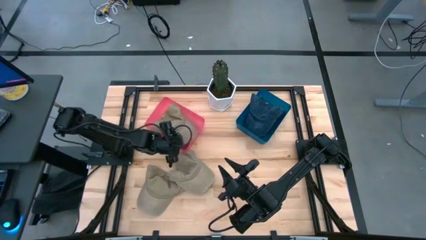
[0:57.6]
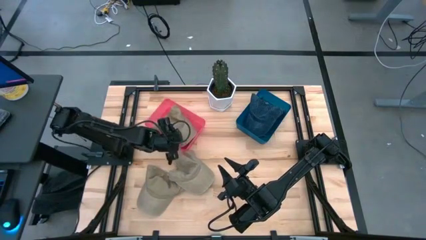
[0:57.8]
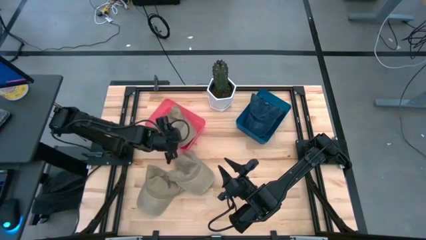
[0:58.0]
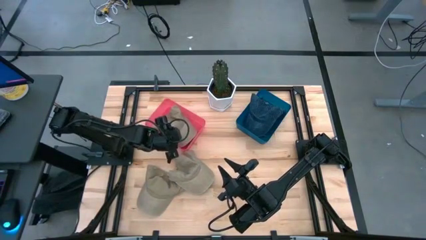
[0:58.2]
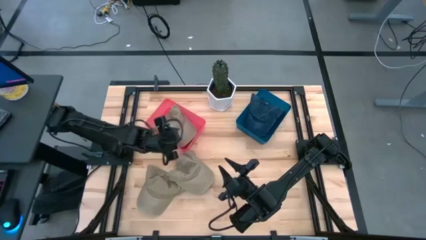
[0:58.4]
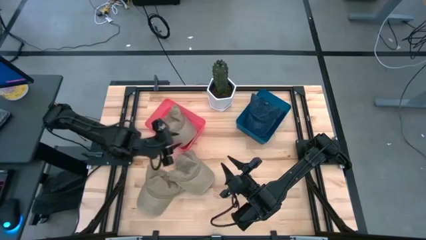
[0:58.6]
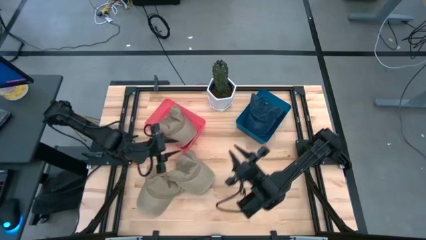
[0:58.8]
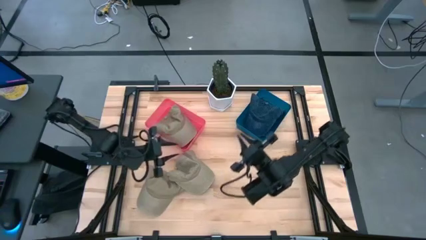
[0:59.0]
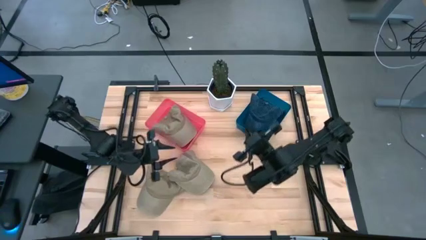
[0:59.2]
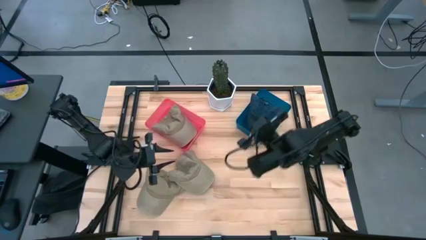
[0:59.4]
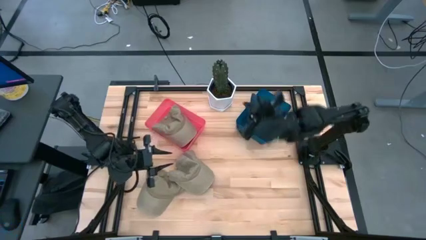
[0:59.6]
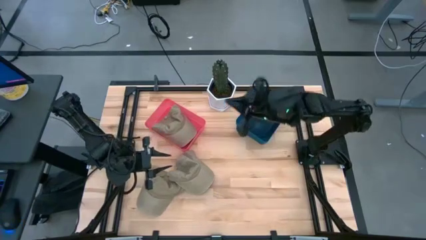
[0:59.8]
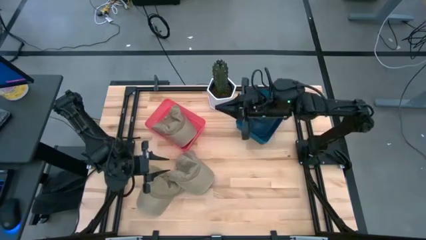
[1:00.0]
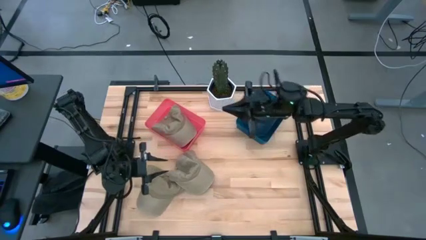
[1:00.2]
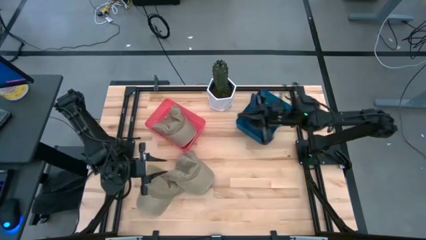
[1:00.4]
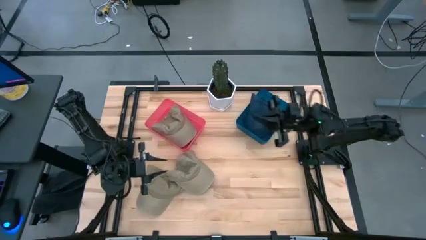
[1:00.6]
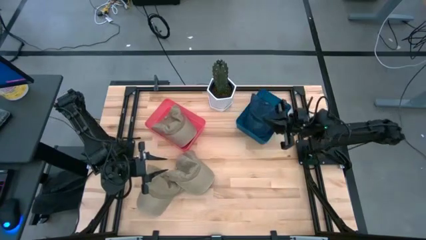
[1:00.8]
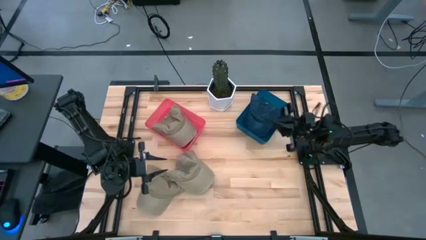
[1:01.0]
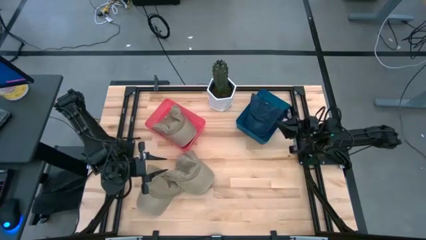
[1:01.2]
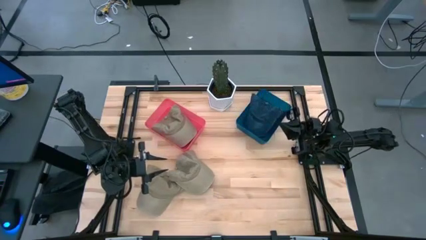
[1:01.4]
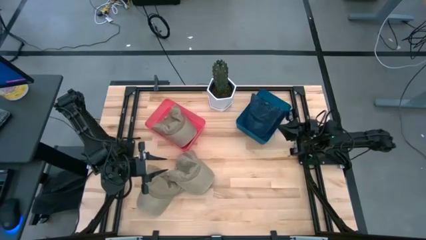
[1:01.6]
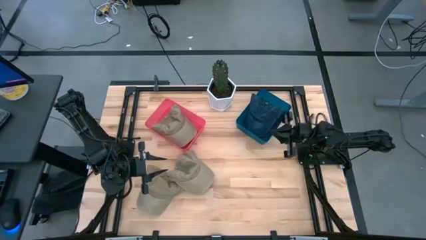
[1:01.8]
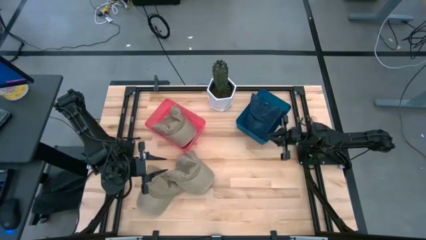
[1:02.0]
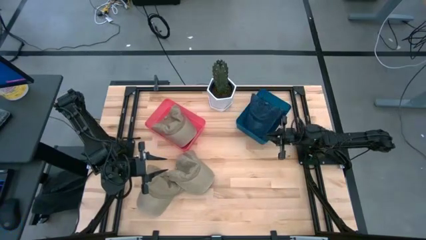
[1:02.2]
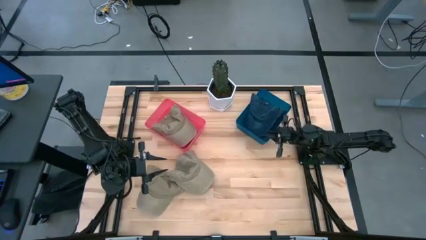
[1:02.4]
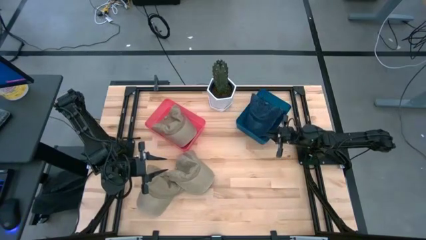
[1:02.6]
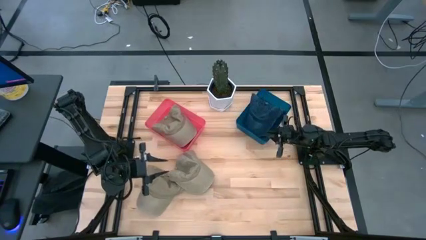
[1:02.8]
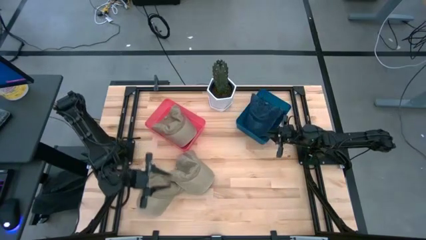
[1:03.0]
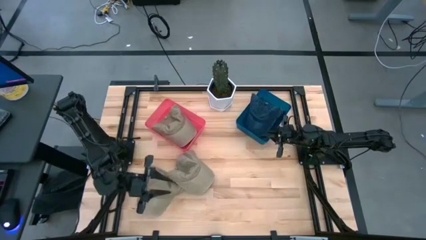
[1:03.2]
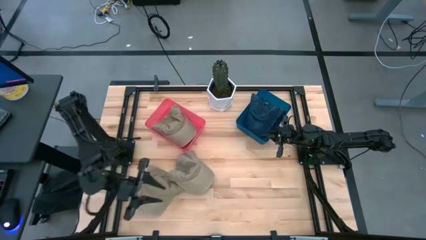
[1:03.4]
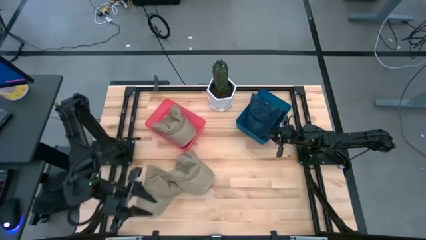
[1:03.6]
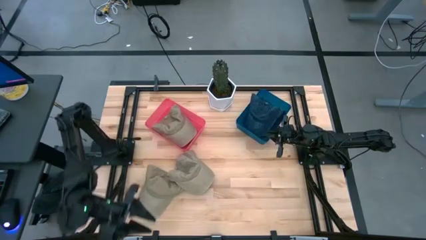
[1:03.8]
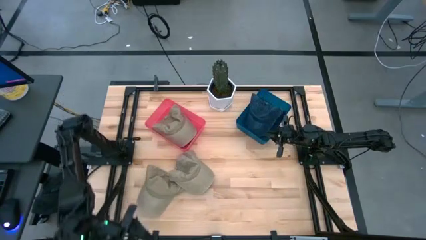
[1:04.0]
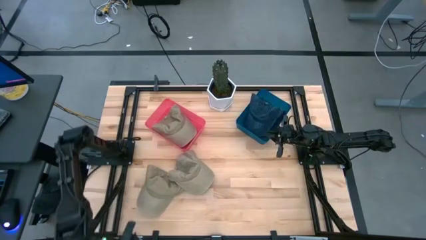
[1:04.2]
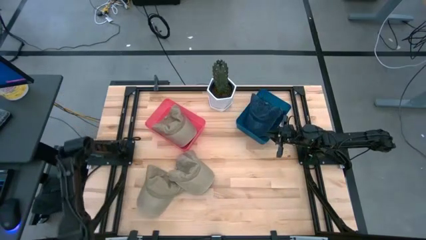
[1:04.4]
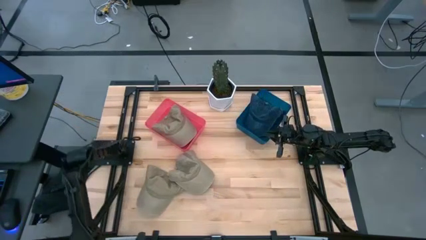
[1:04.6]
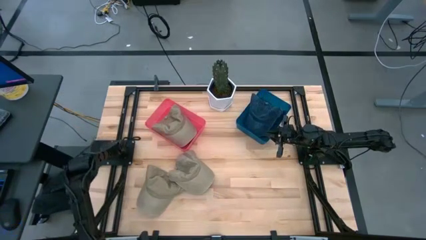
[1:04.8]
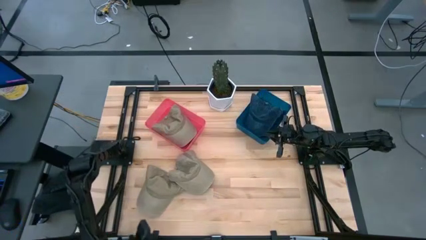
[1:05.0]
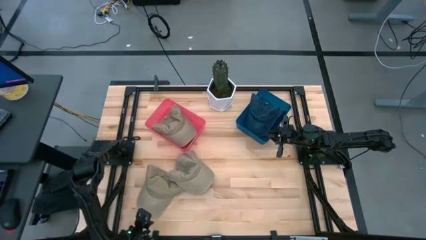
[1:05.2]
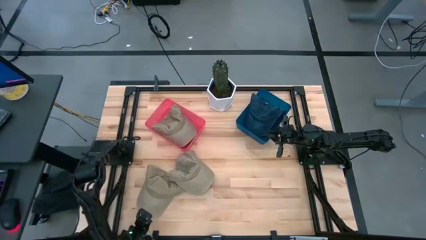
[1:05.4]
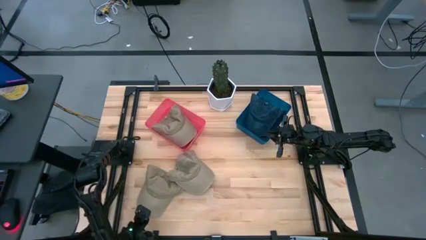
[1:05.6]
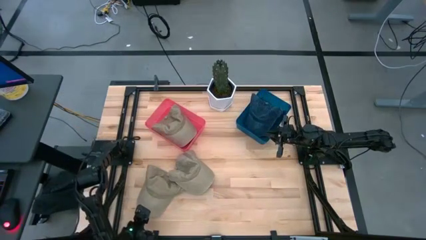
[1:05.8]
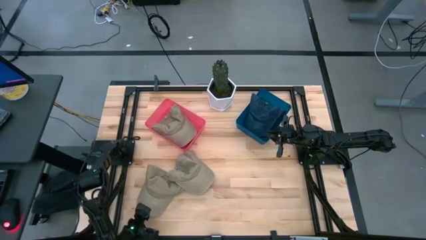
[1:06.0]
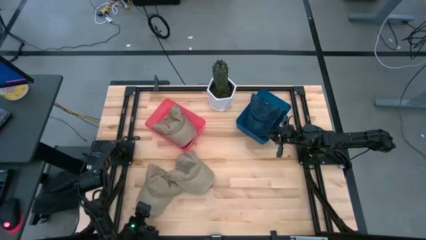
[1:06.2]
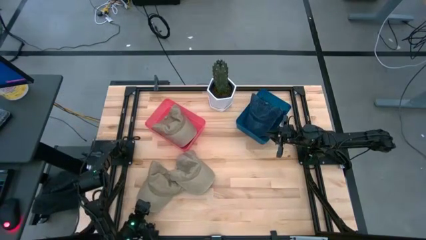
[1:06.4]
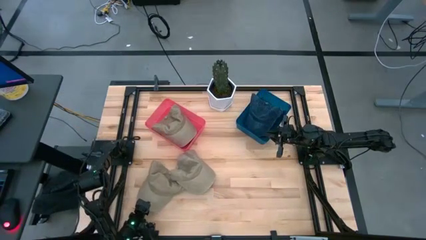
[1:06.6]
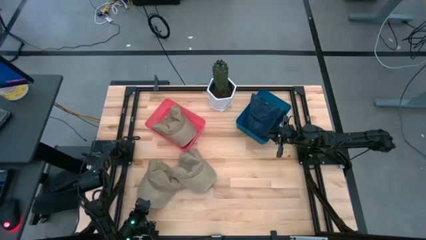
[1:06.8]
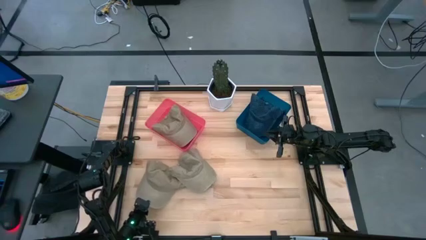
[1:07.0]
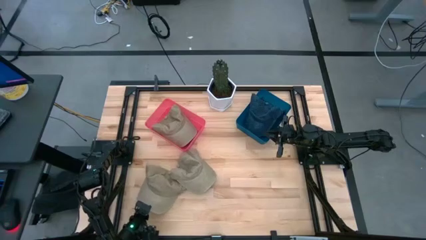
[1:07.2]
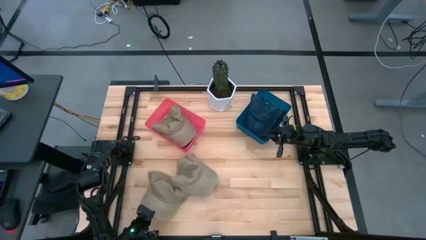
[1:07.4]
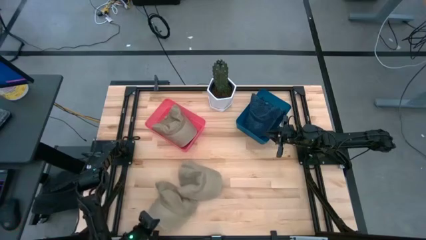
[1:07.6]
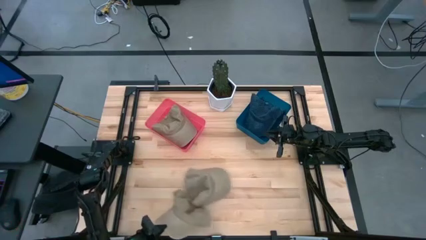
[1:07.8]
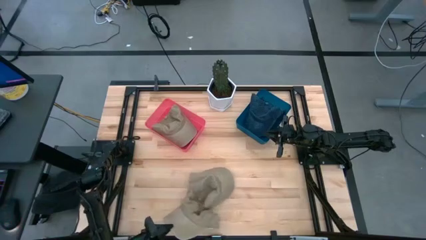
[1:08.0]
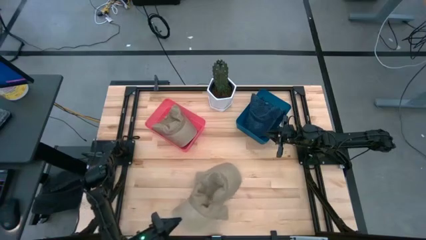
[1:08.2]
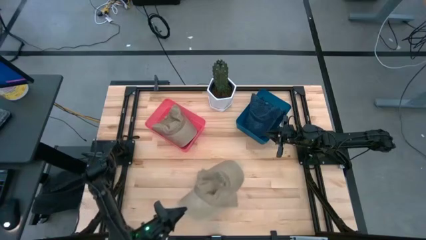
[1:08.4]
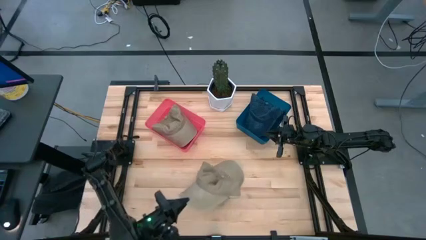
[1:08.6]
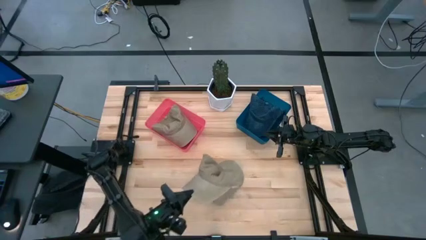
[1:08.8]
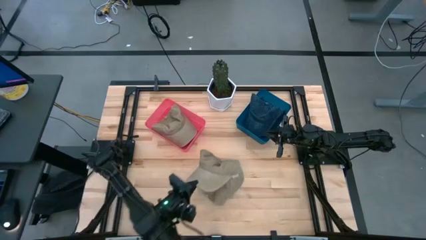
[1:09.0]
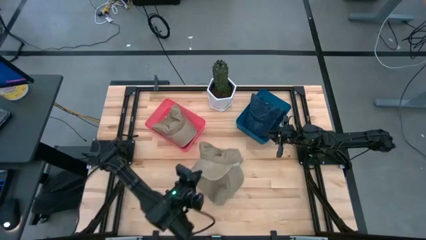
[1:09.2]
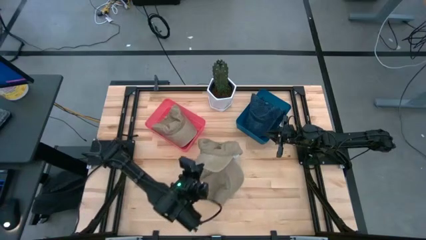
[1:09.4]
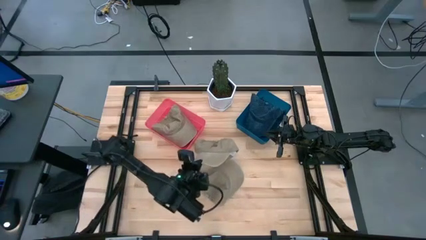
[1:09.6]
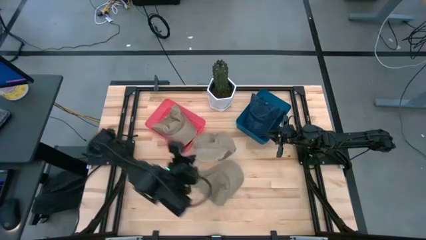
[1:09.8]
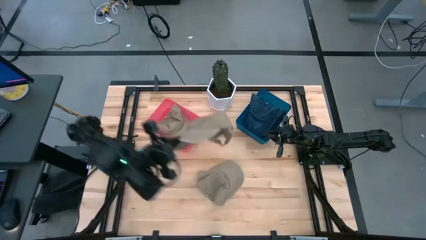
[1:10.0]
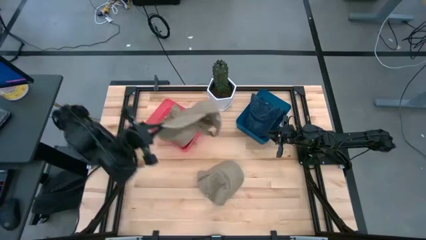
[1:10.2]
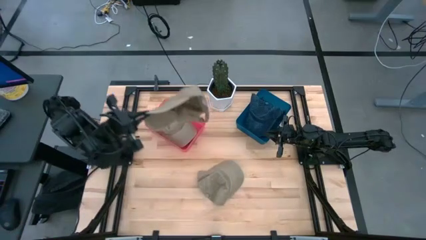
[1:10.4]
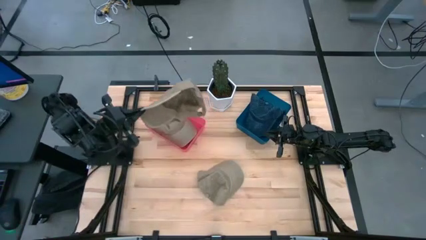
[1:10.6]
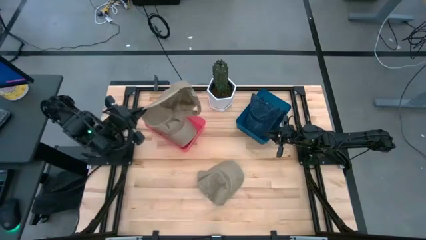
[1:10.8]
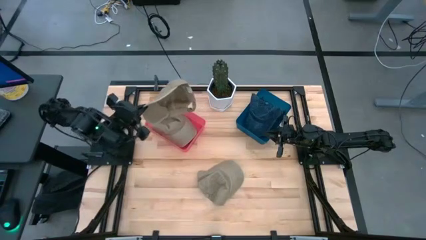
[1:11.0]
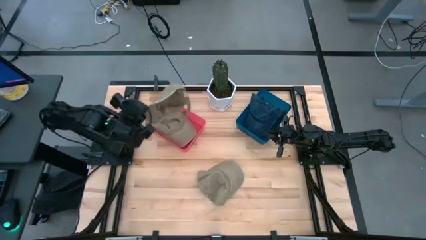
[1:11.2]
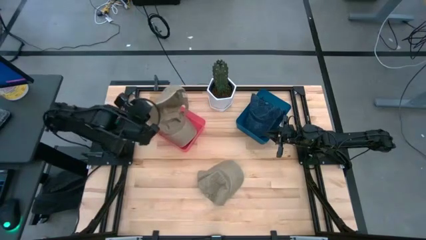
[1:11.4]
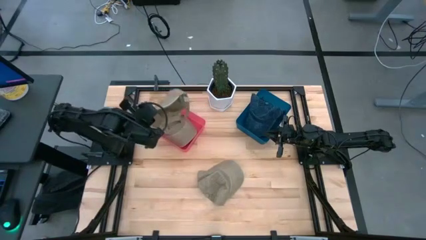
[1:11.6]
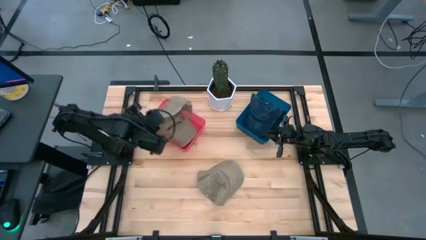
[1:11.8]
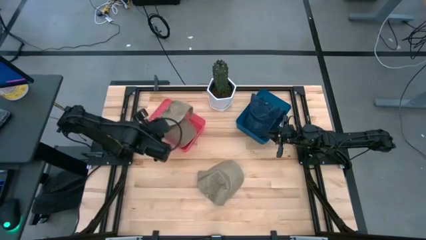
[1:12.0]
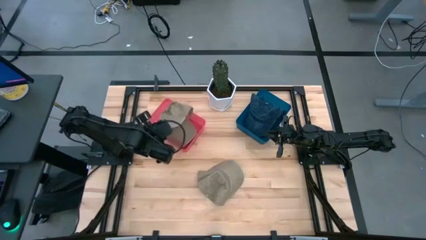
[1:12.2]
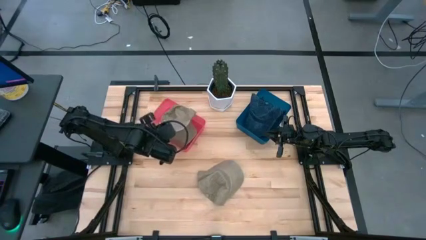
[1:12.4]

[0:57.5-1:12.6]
Task: Pick & Place hat
Put the left brown cap into the red bin
